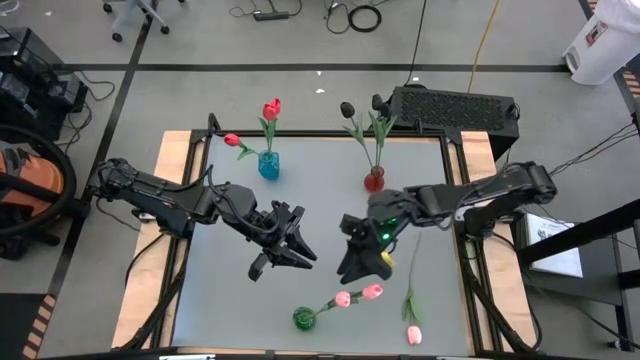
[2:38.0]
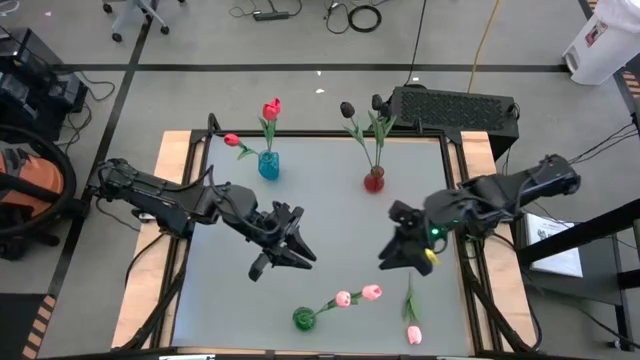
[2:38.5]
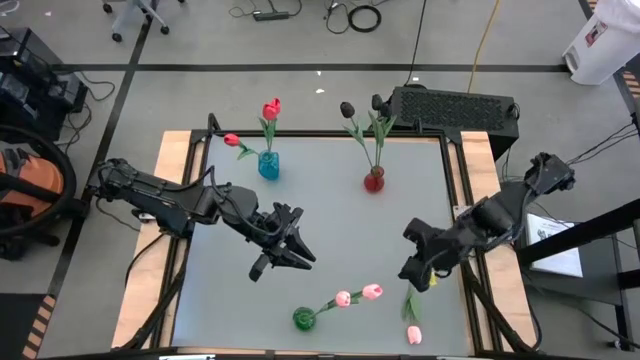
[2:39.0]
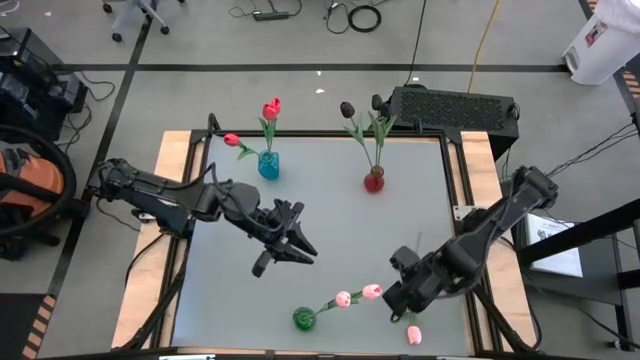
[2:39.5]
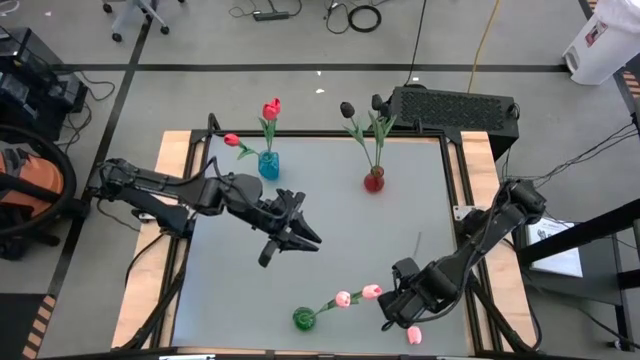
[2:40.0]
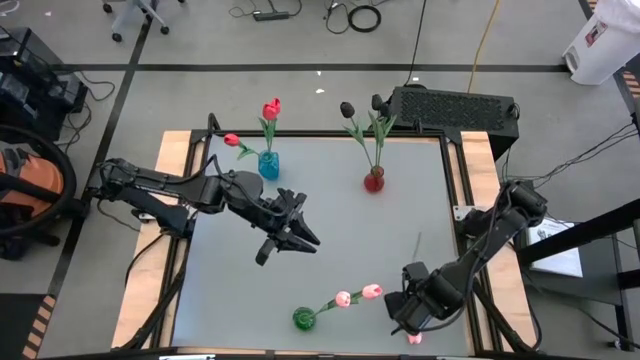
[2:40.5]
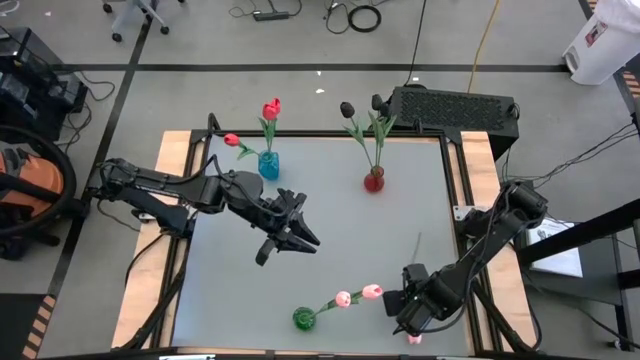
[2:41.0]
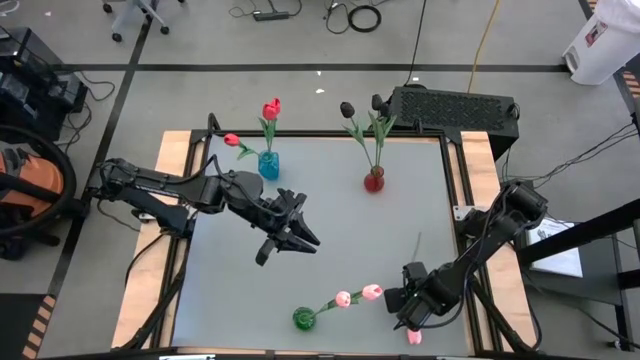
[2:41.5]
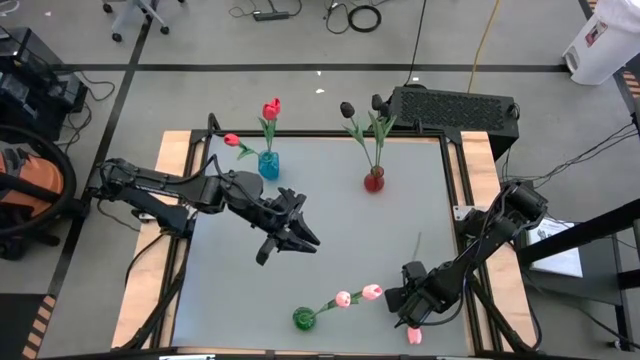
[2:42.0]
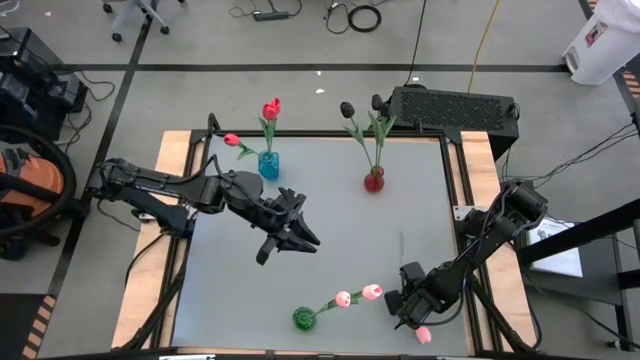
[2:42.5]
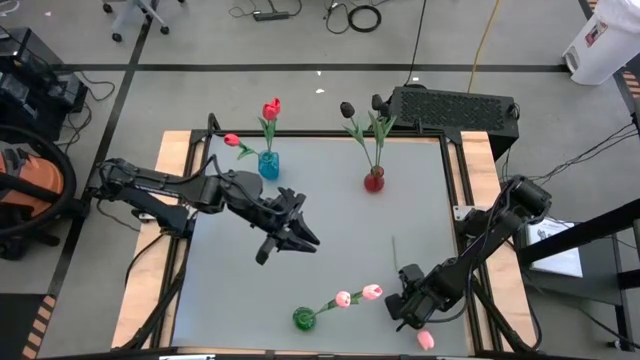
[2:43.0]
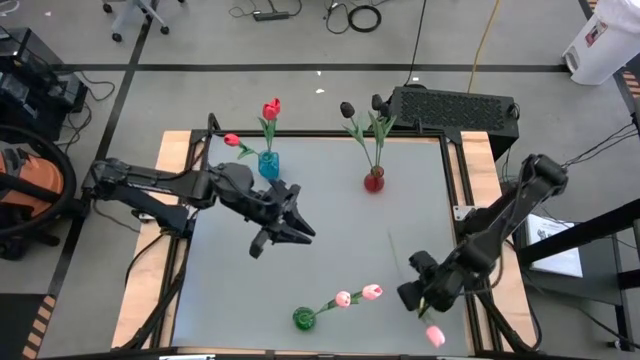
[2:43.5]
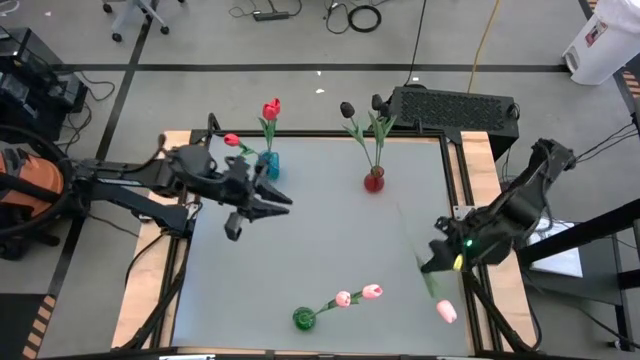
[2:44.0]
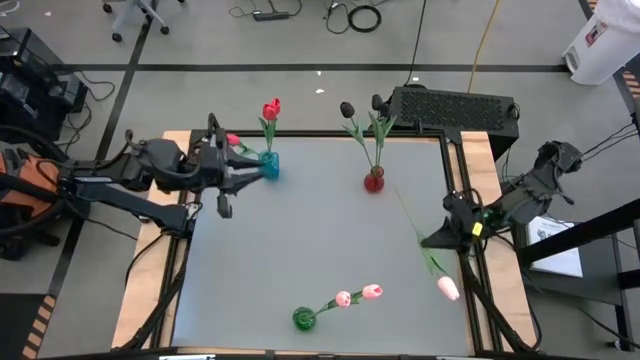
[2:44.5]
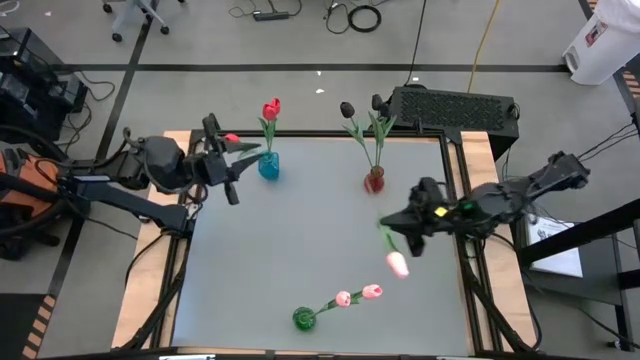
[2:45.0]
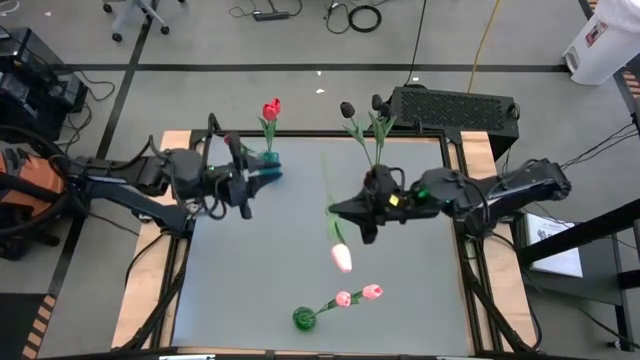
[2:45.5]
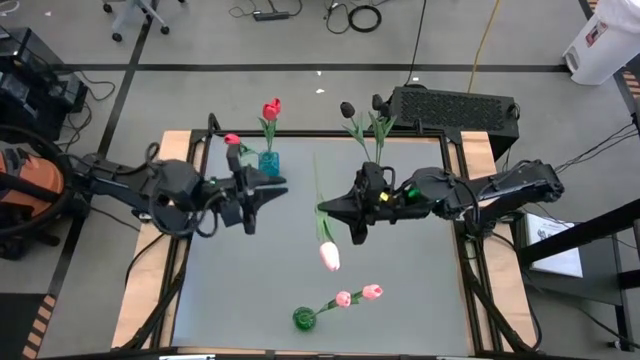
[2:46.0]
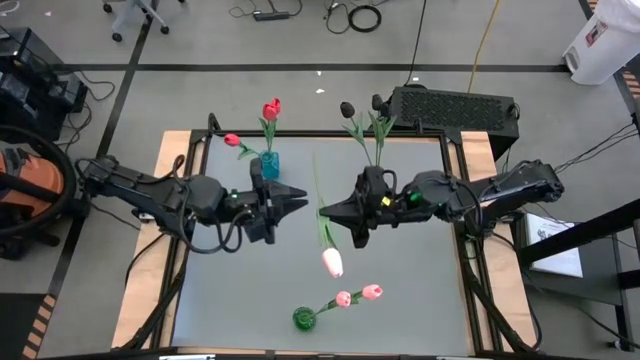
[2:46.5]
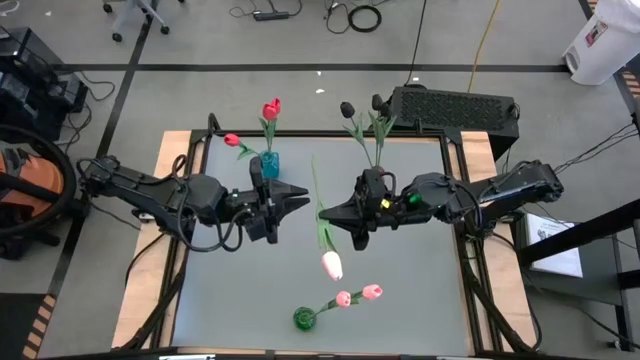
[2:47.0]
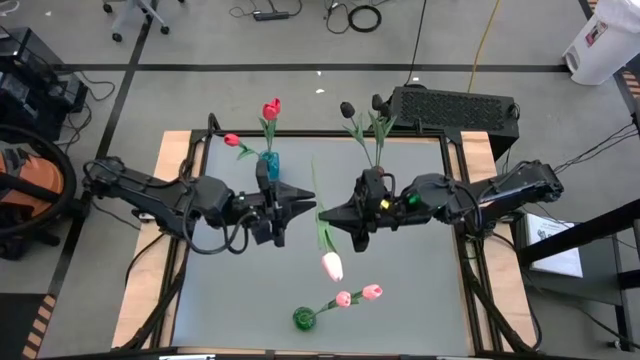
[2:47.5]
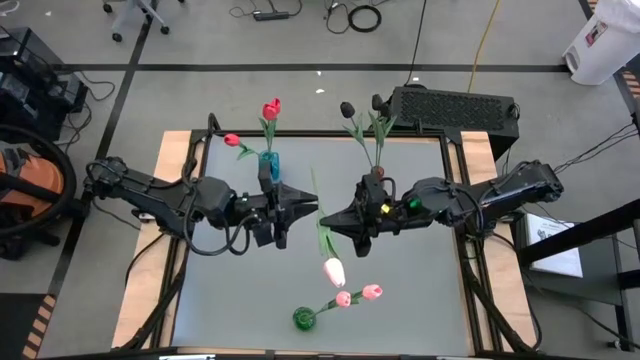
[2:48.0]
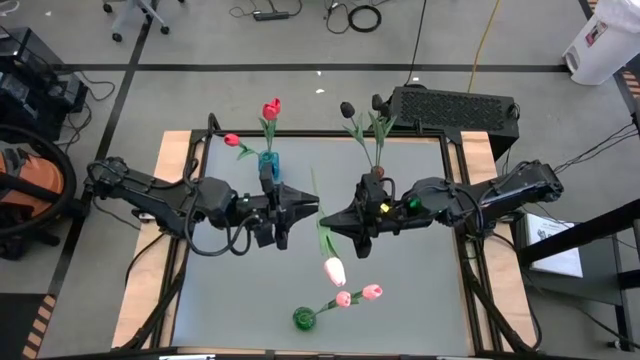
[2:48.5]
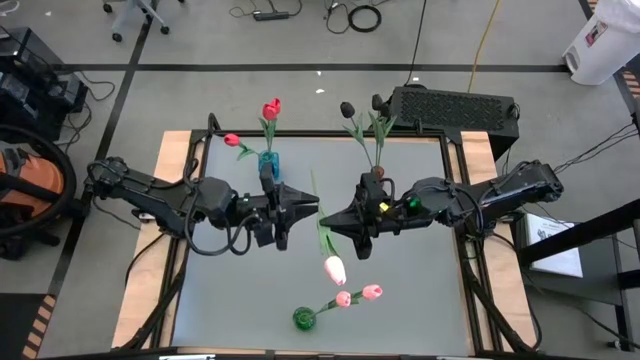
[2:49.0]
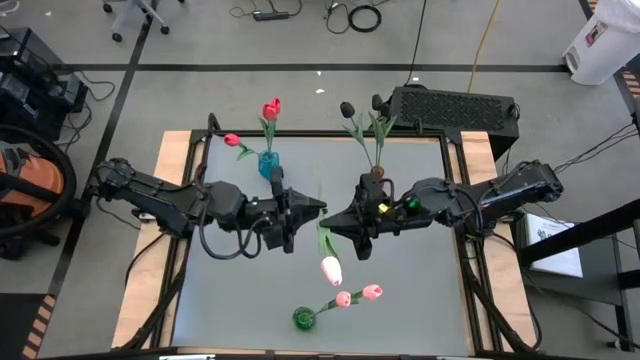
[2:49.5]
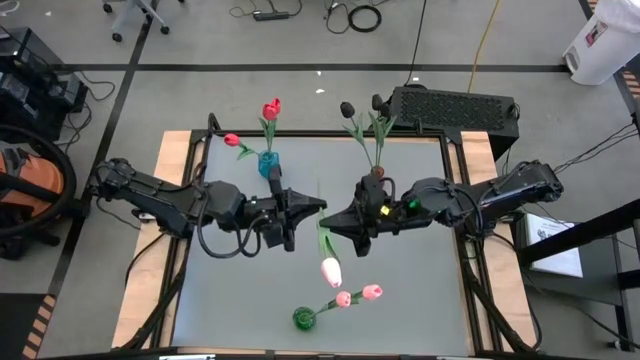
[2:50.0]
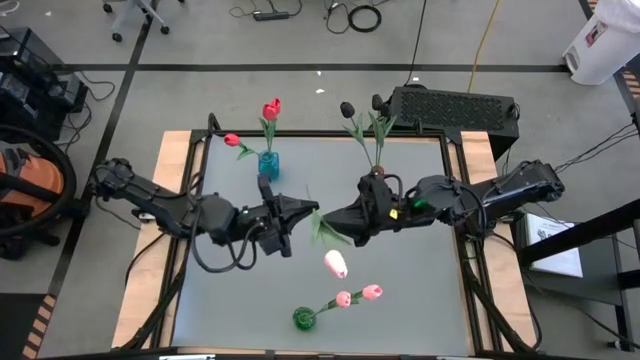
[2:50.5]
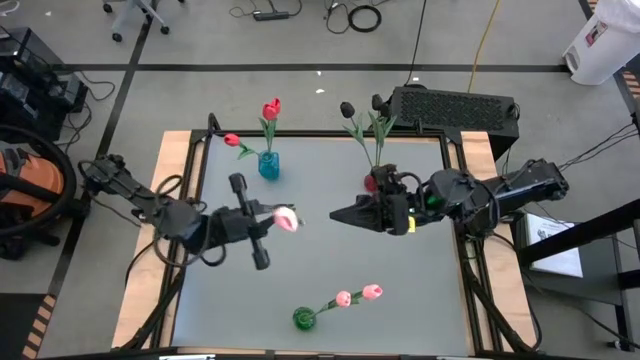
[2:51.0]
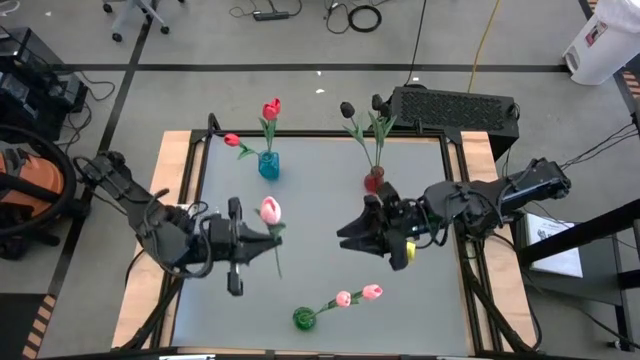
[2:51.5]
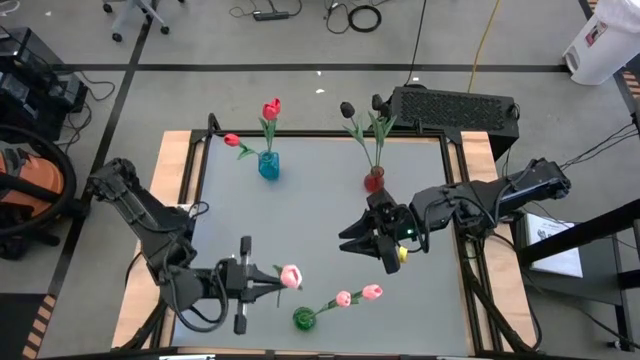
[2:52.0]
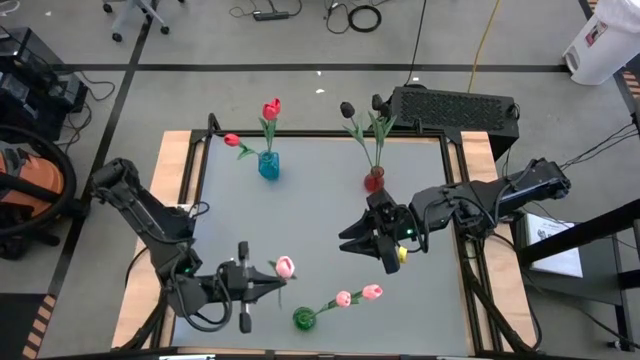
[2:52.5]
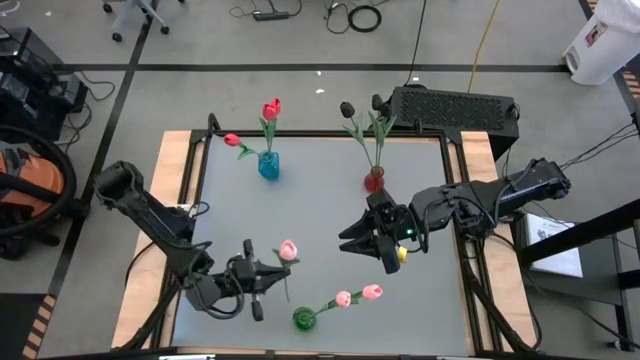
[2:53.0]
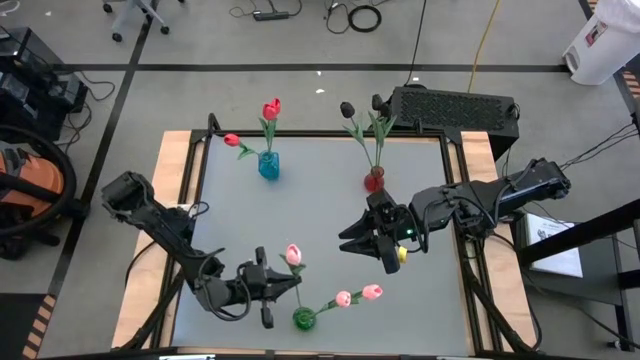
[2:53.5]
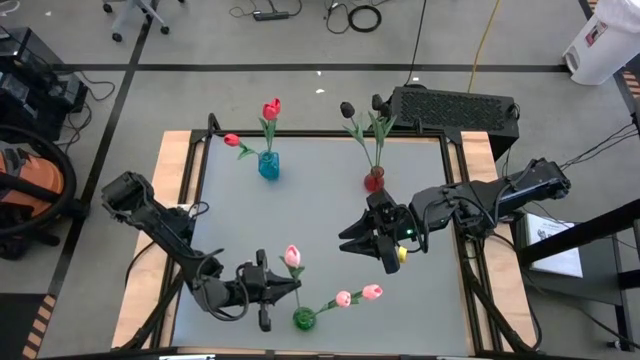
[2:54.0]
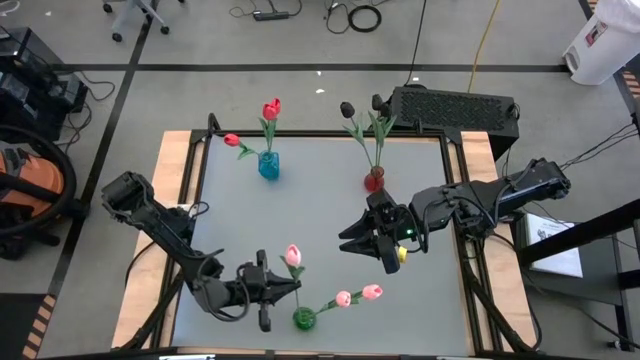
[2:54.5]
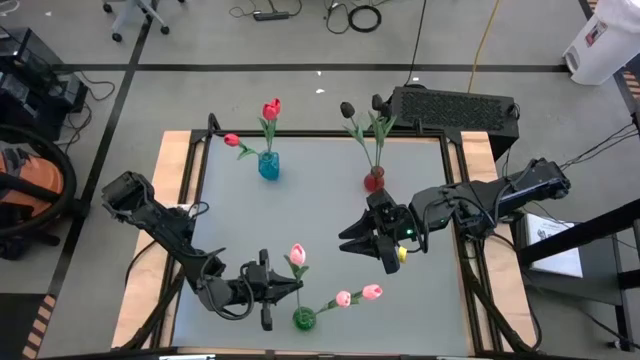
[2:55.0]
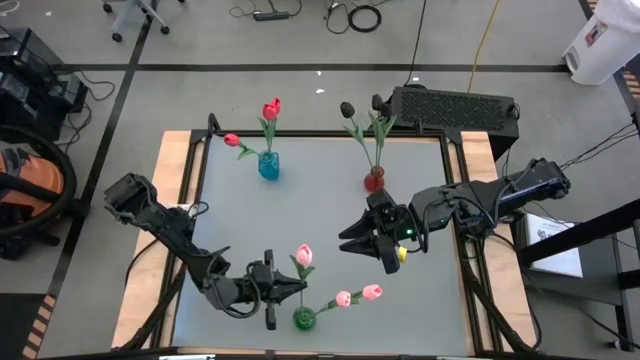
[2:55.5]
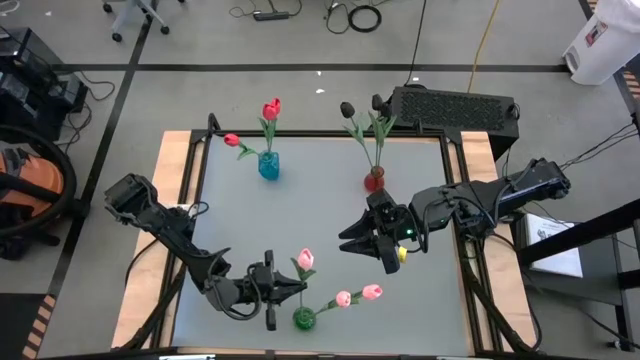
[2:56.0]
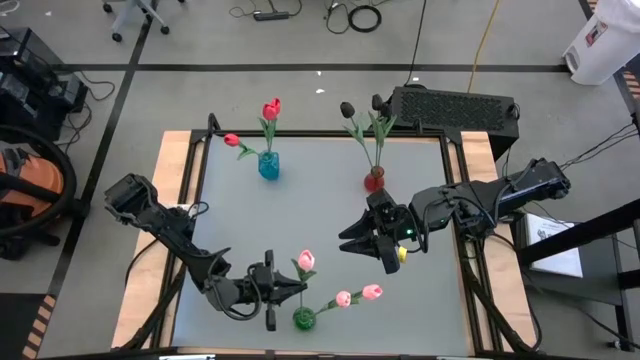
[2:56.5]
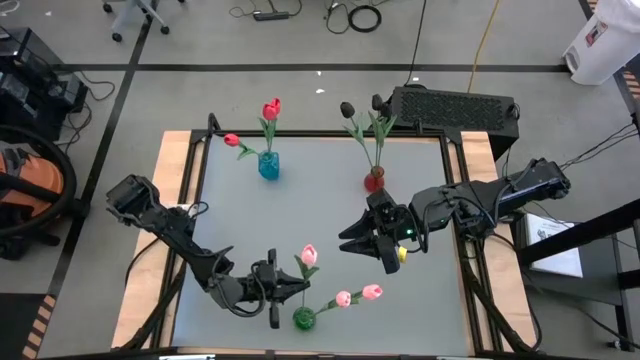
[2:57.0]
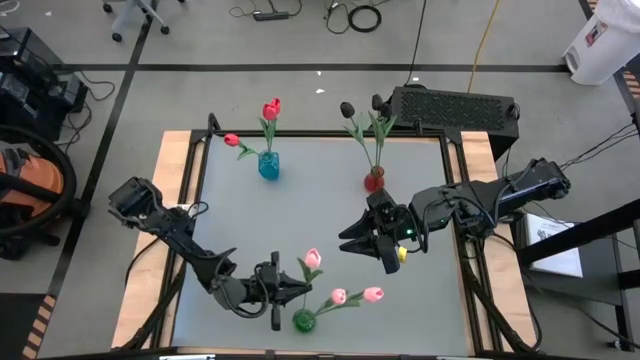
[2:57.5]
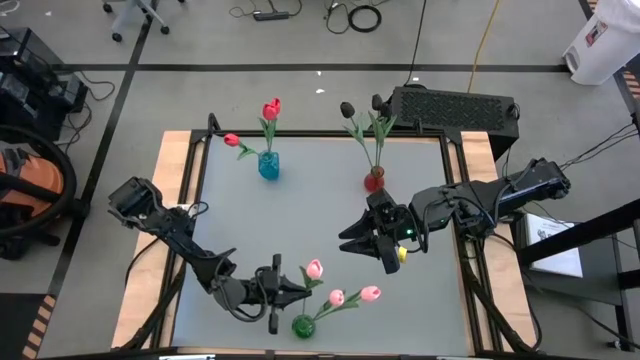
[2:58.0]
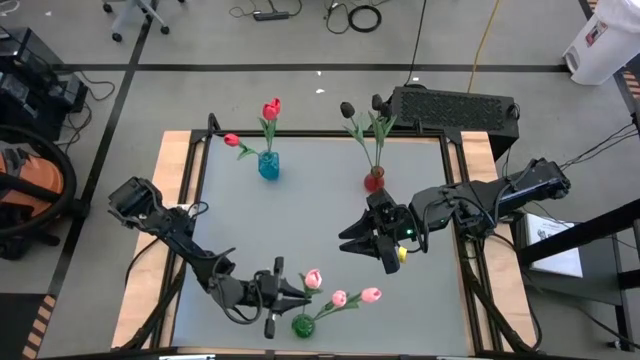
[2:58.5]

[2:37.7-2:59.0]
Task: Sort flowers into vase by color
Put the pink tulip into the green vase

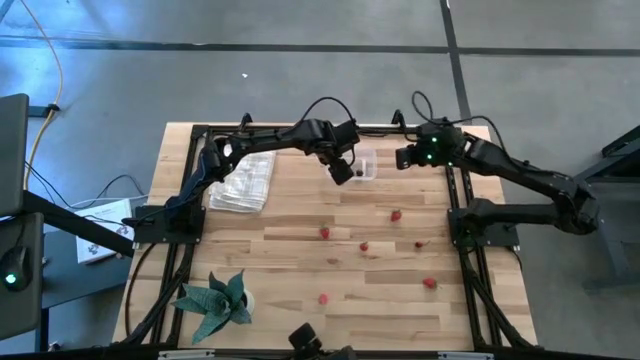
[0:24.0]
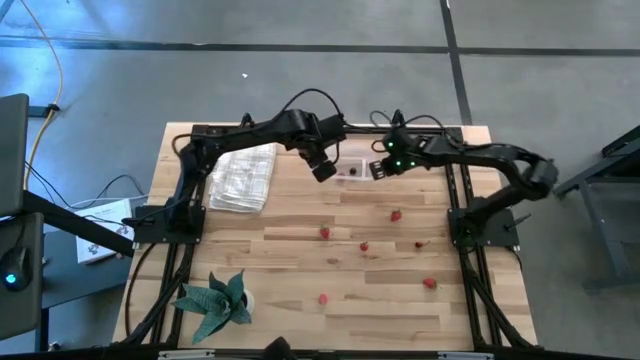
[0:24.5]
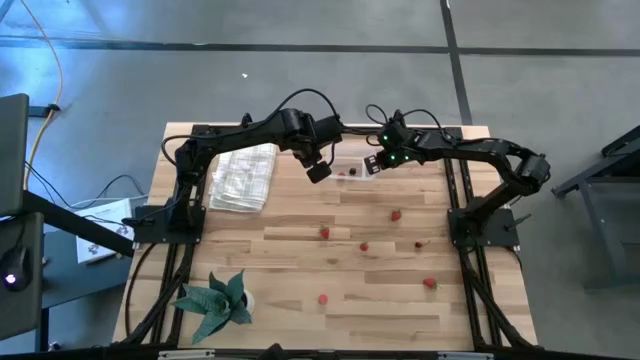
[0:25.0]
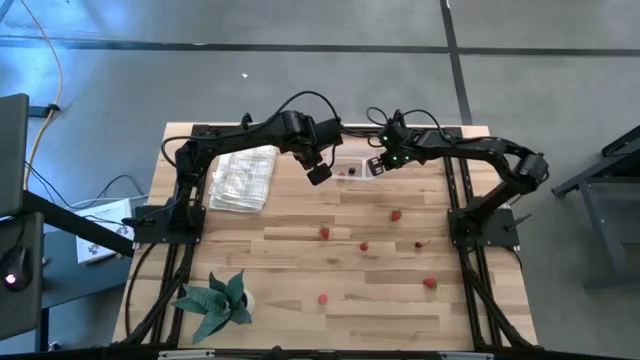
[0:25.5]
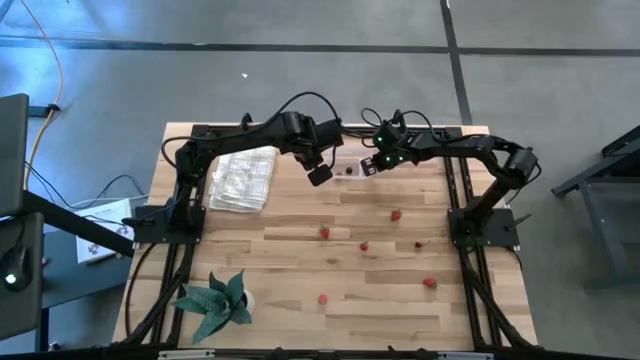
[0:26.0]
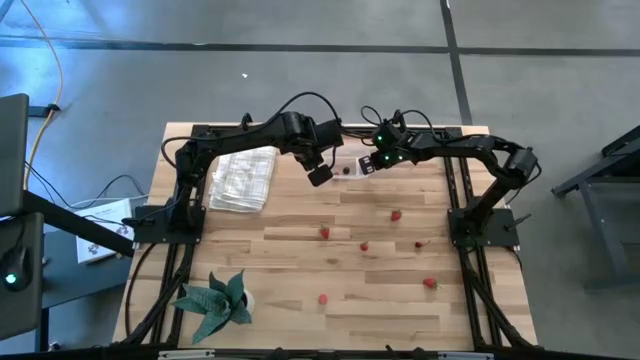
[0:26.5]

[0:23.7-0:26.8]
Task: Pick and placing Produce into tupperware
Adjust the transparent container
